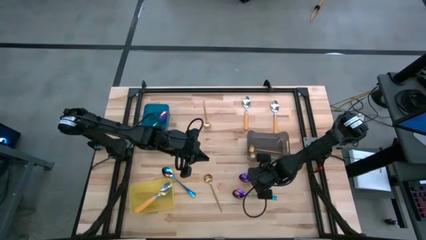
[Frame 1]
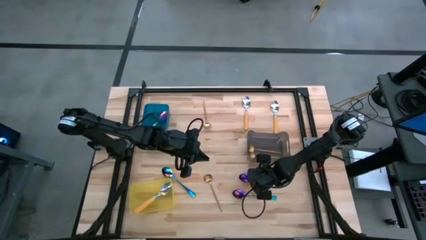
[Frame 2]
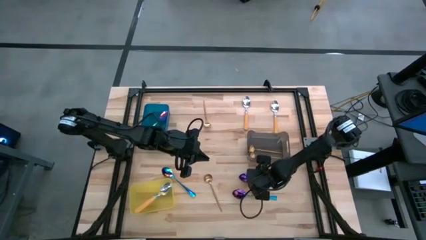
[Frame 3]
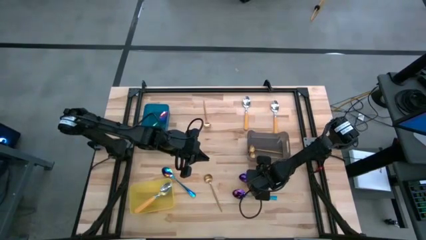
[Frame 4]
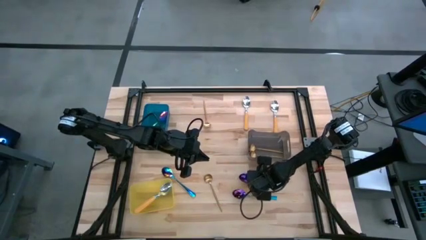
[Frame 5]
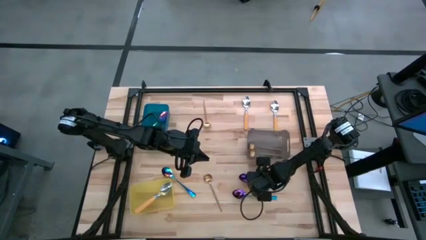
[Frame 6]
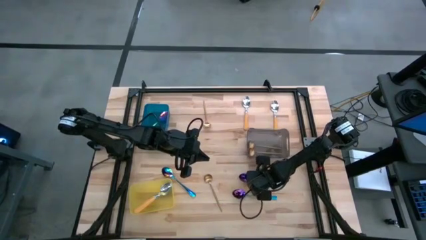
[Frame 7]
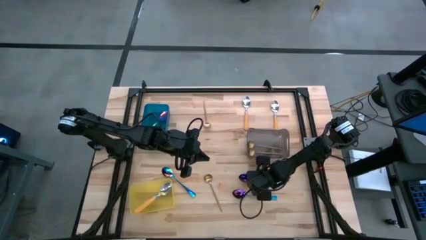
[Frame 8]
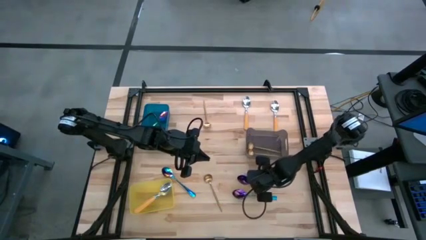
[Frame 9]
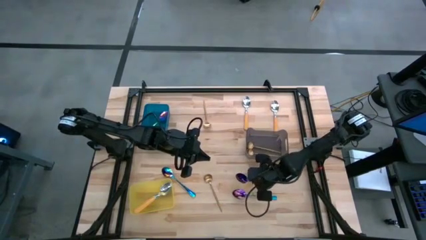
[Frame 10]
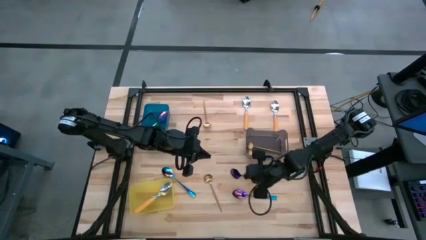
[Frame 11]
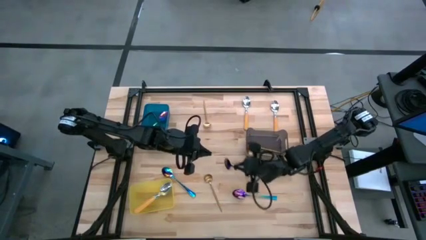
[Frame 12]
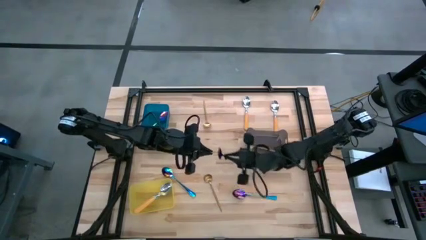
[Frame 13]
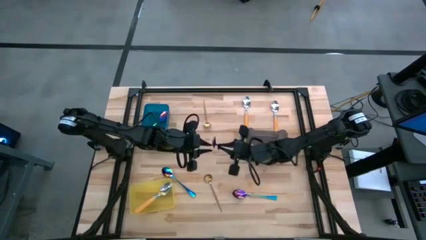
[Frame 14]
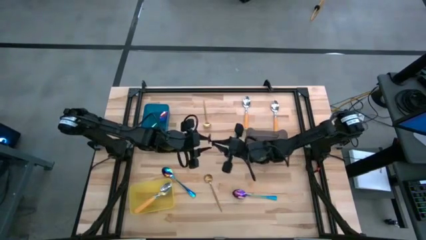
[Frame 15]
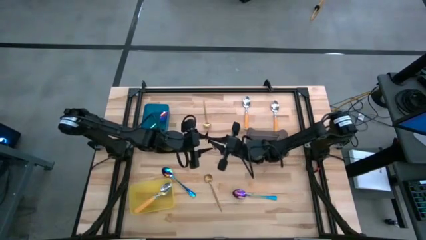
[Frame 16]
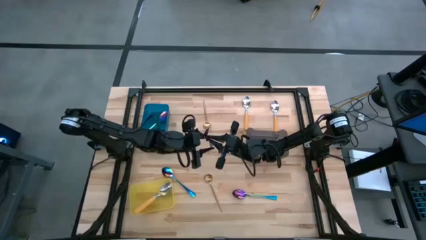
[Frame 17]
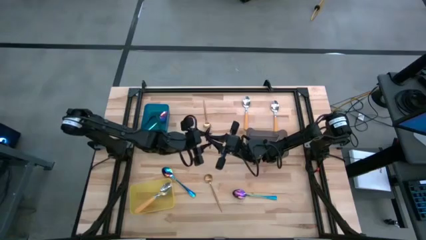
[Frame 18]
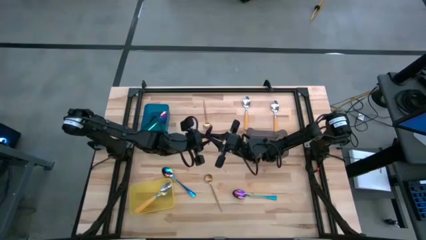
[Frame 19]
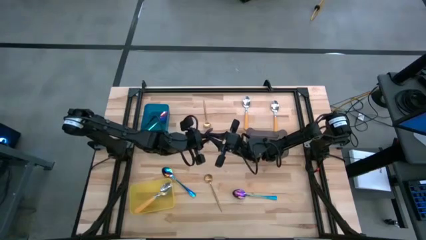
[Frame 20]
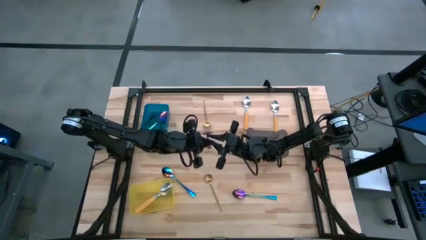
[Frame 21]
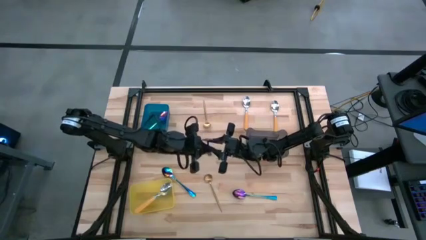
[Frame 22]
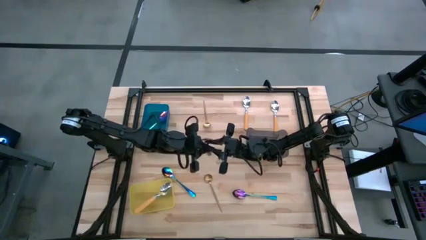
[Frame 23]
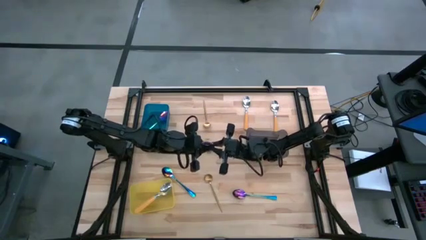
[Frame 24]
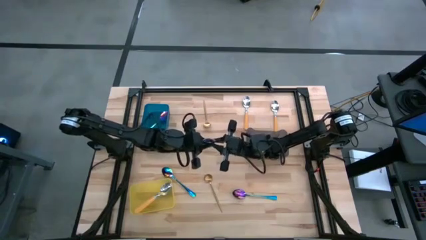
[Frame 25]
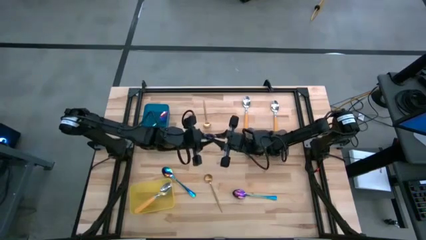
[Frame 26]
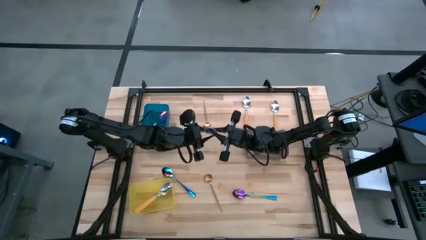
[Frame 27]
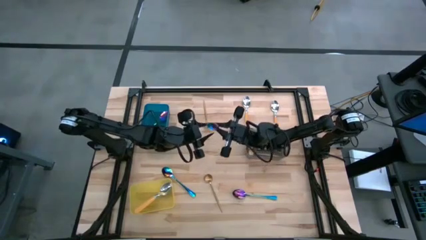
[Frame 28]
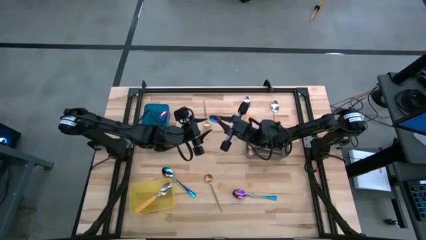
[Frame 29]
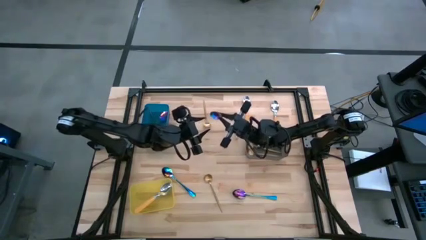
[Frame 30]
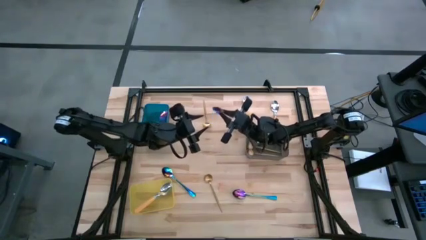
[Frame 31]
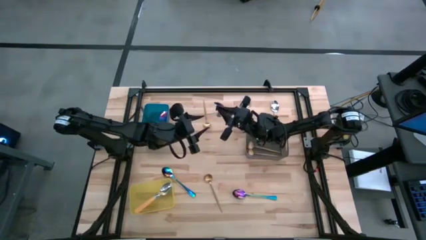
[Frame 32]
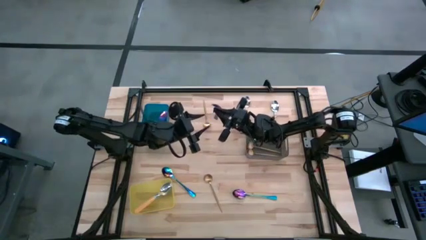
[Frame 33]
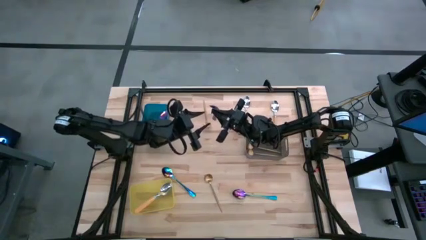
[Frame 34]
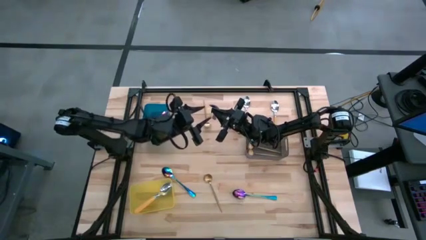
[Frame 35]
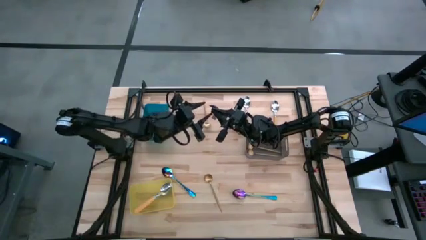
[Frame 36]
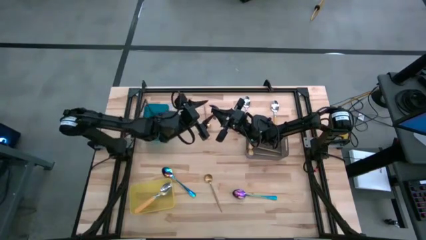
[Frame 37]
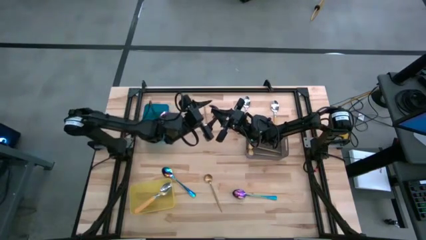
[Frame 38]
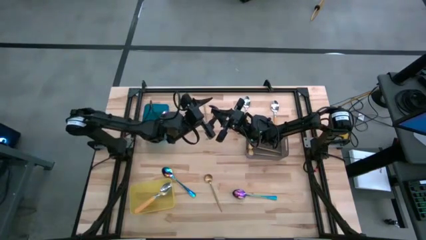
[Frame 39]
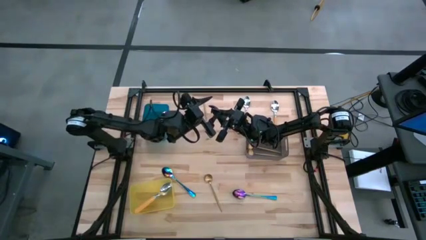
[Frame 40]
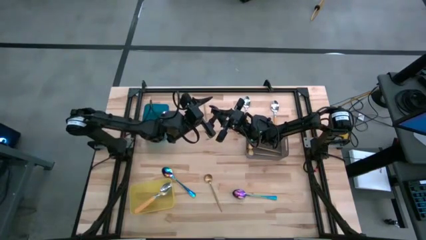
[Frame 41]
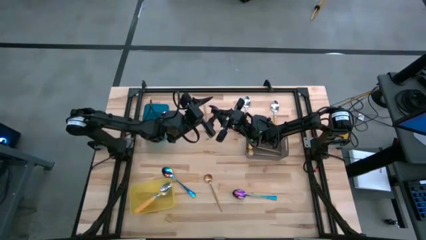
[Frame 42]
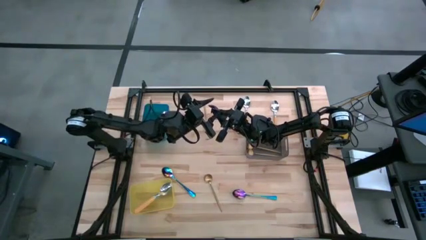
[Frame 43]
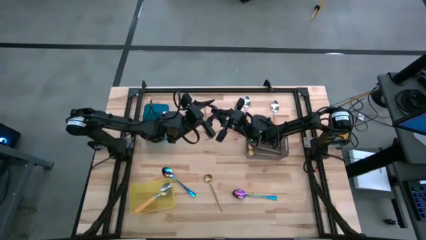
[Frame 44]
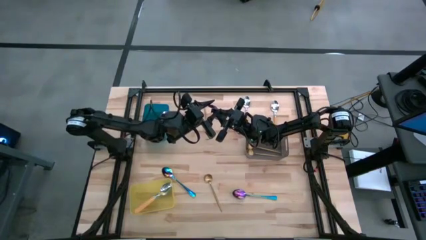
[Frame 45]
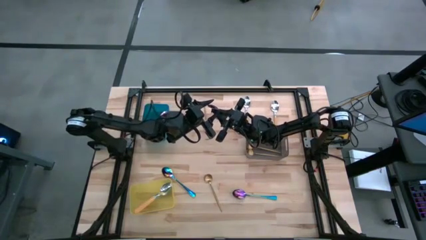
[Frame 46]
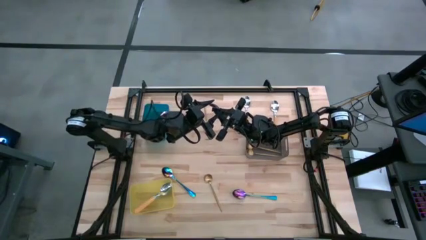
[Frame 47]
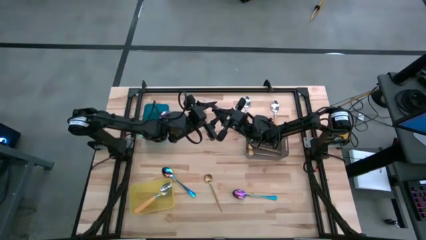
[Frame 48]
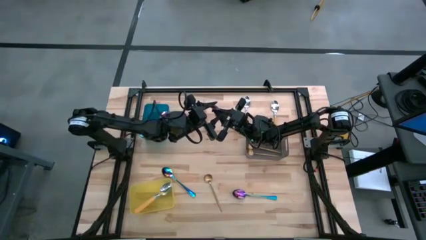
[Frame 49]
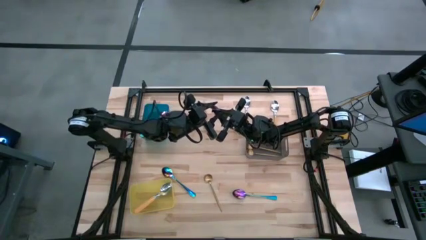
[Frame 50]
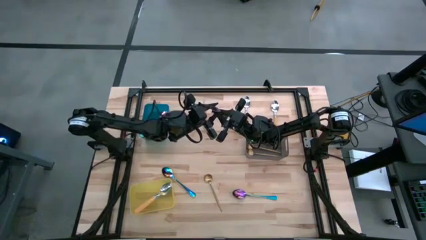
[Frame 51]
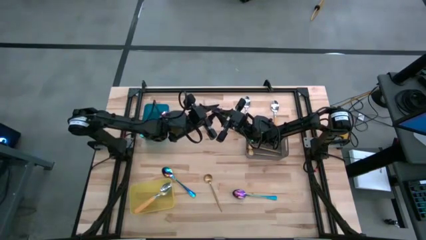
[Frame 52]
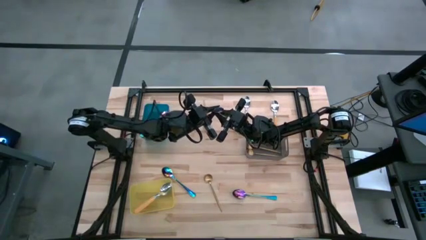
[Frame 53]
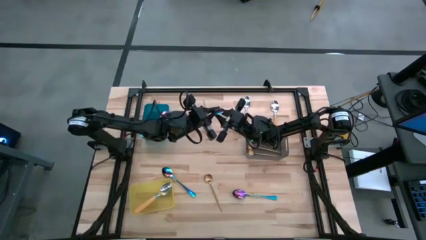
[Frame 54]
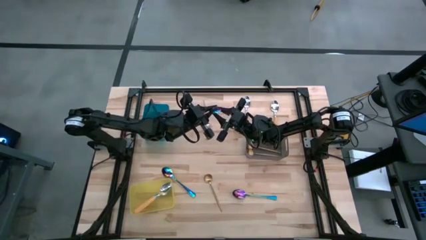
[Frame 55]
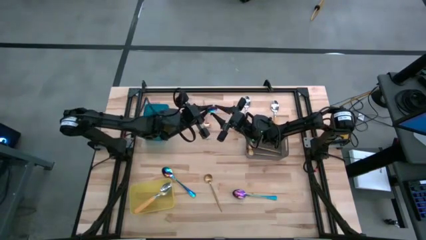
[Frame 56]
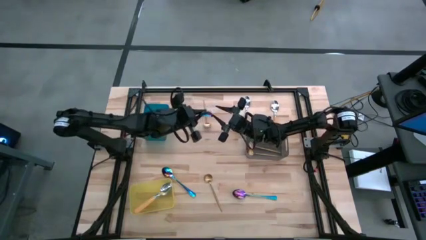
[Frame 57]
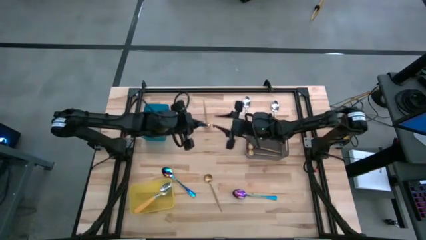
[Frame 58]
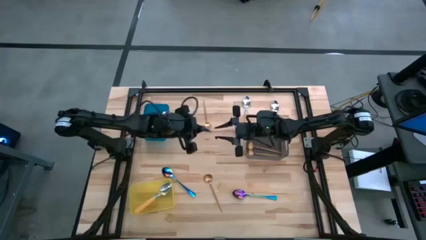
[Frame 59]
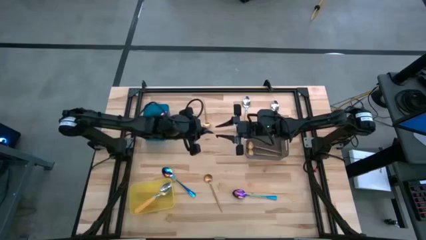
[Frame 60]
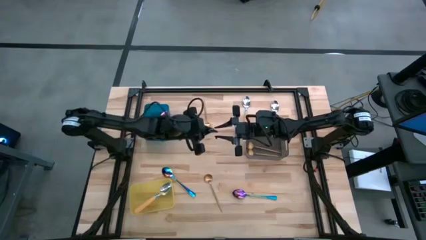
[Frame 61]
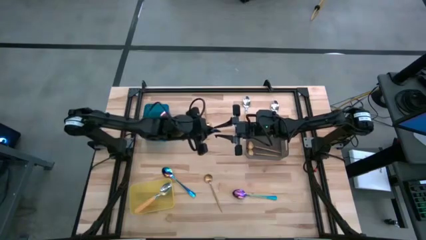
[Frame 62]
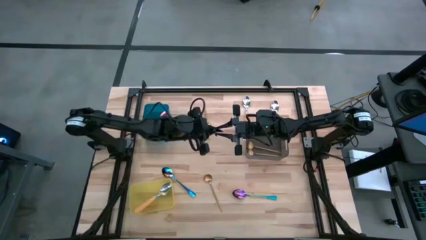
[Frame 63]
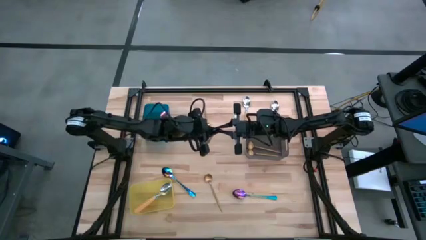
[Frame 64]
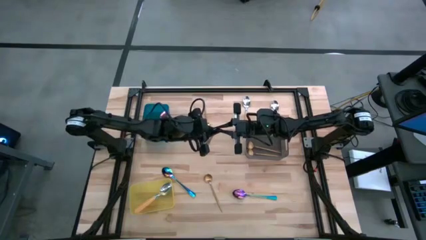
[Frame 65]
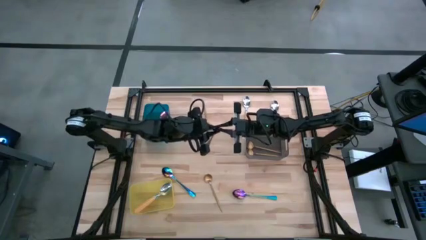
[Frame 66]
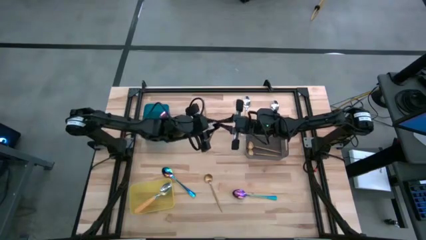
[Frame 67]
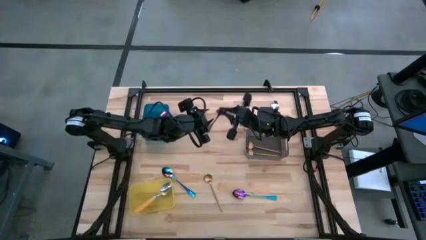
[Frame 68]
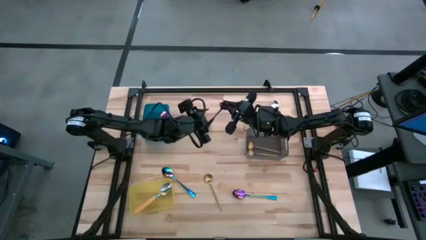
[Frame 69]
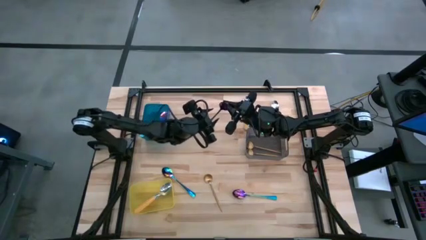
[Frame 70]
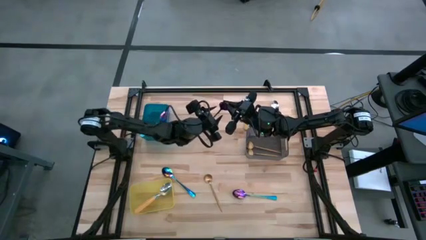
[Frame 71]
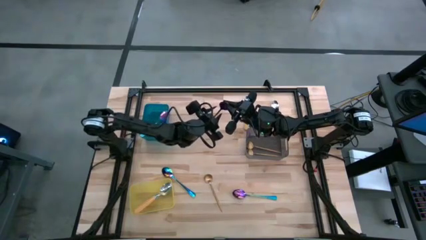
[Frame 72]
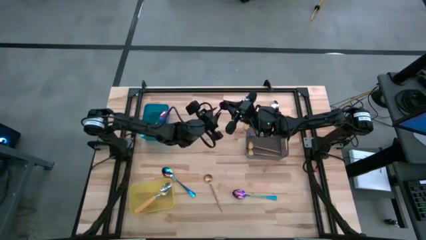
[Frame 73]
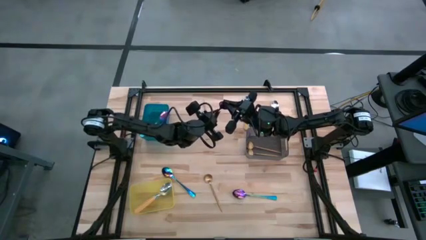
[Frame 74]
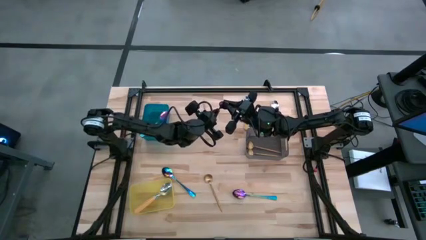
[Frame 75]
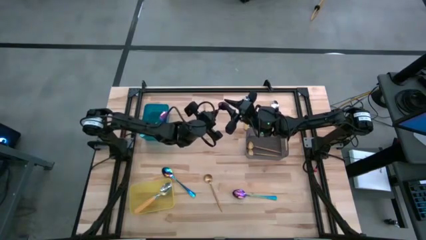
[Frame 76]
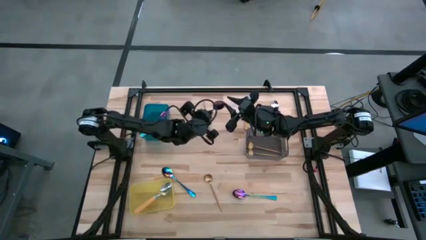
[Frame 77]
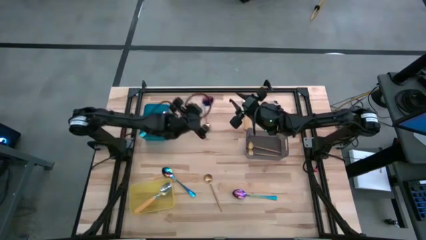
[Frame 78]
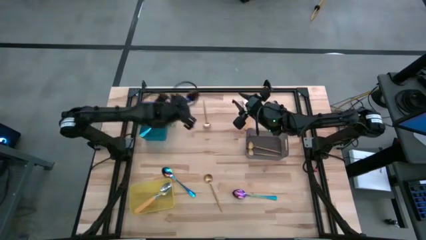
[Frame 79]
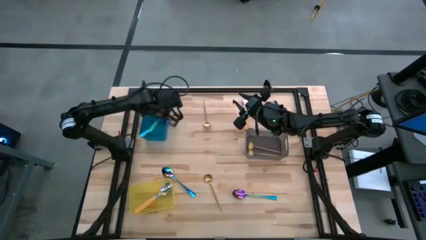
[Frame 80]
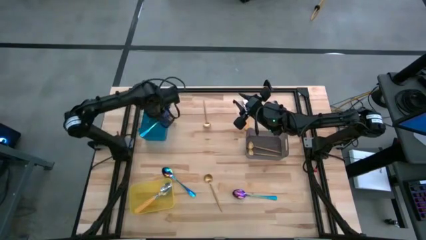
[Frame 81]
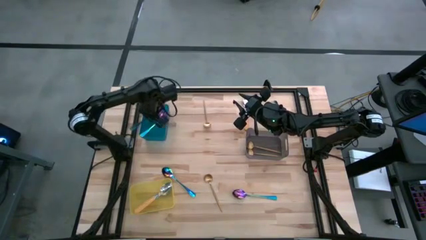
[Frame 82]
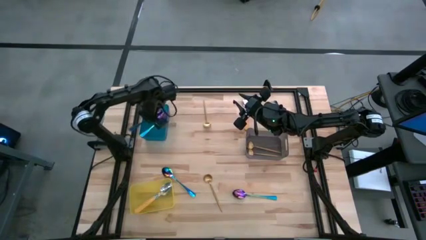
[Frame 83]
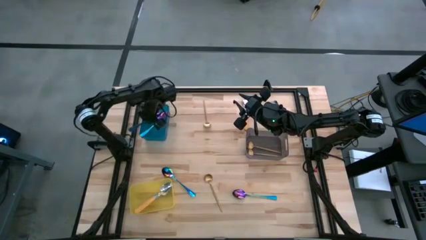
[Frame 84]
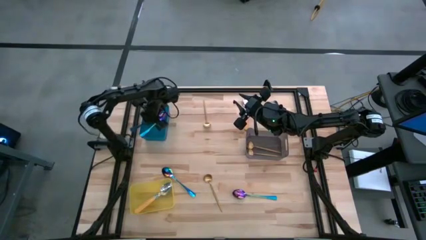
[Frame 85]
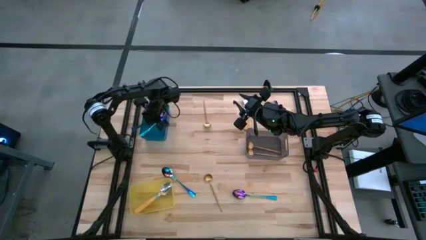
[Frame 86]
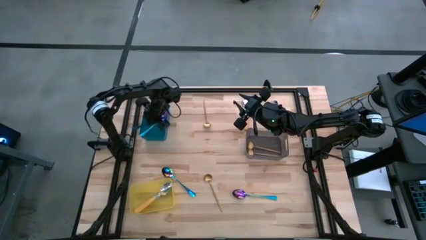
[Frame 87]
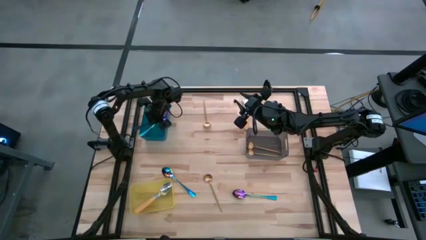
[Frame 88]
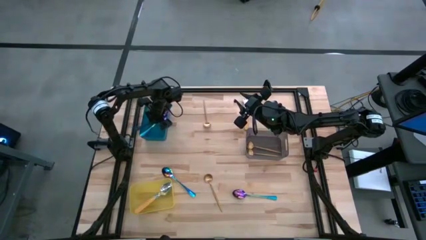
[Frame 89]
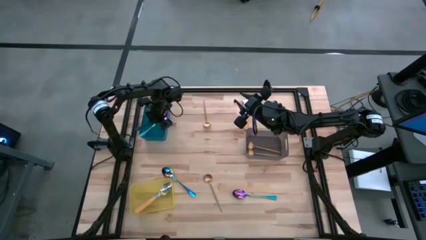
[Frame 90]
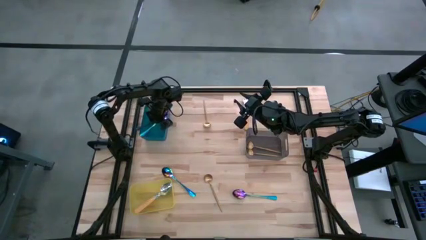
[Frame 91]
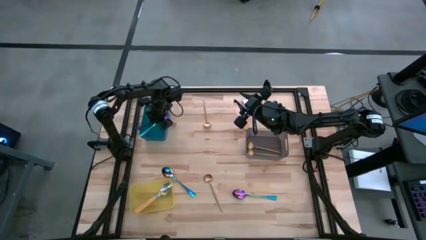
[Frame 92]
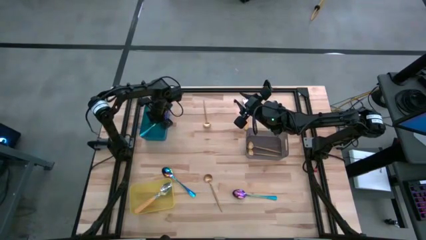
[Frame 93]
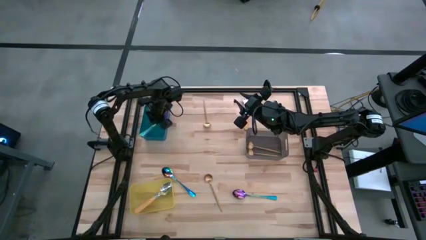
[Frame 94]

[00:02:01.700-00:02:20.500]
Task: Sort silverware by color (type)
Put the blue spoon into the blue bin
